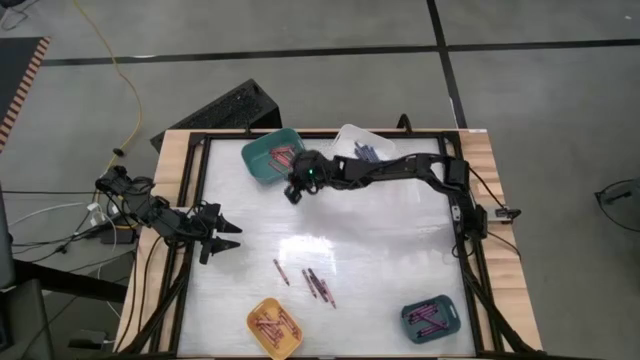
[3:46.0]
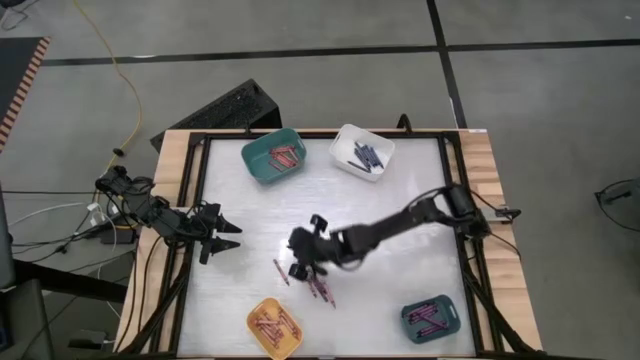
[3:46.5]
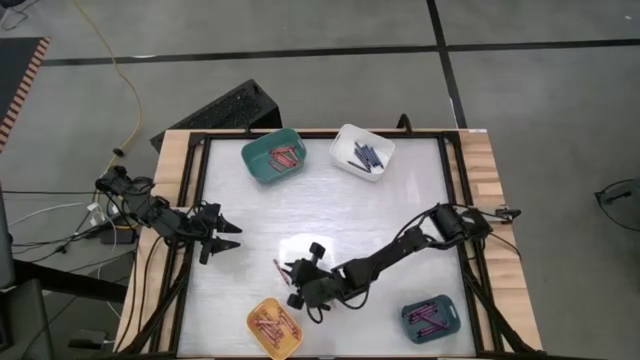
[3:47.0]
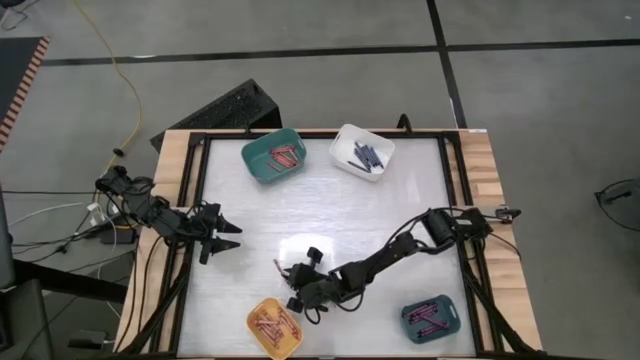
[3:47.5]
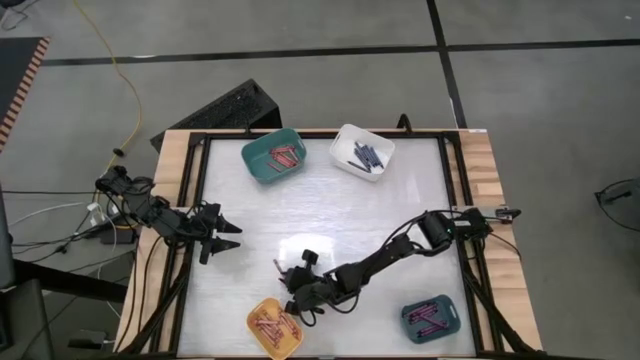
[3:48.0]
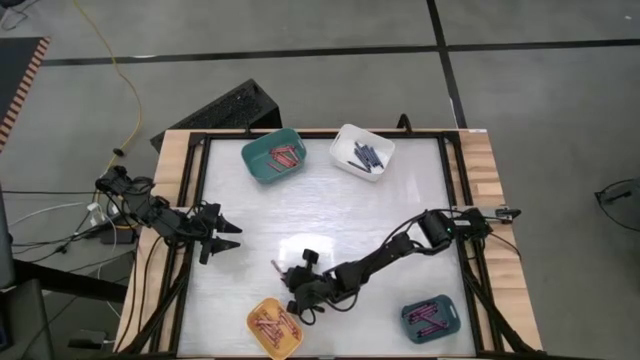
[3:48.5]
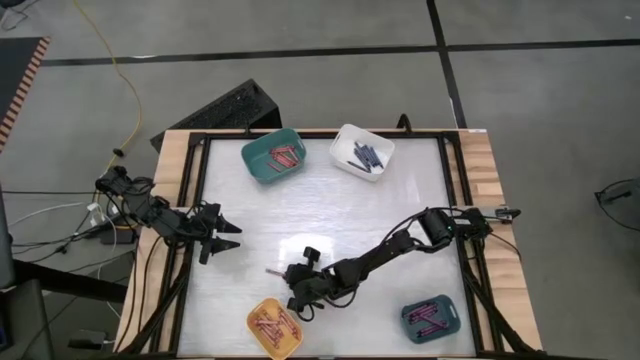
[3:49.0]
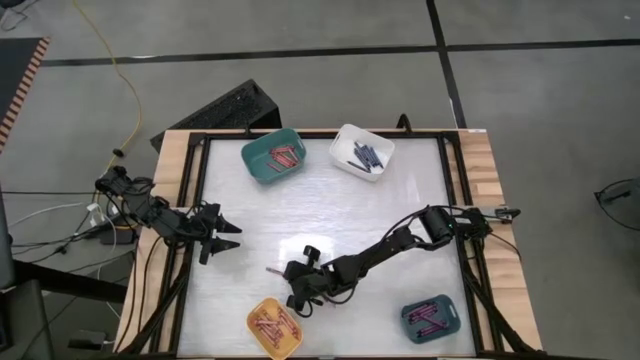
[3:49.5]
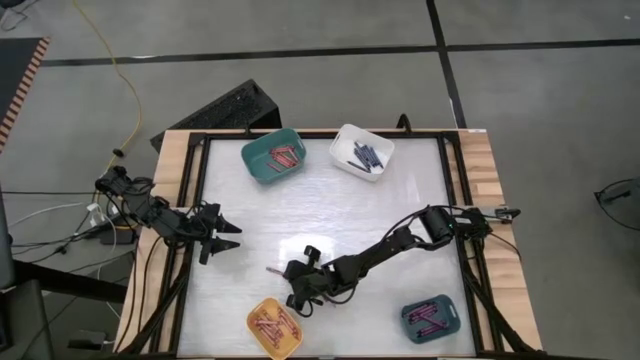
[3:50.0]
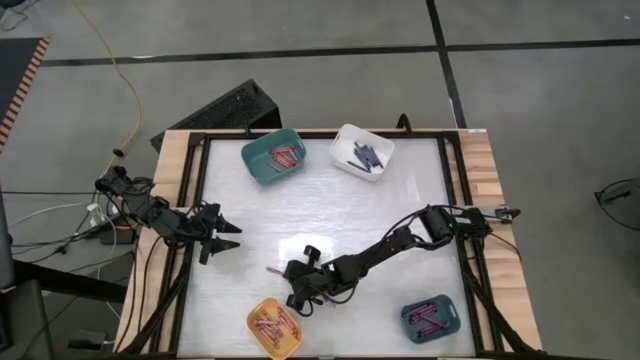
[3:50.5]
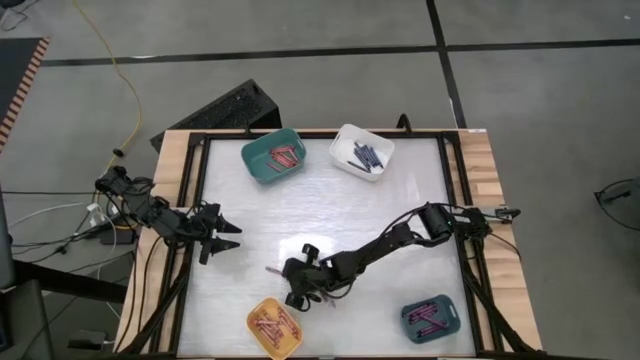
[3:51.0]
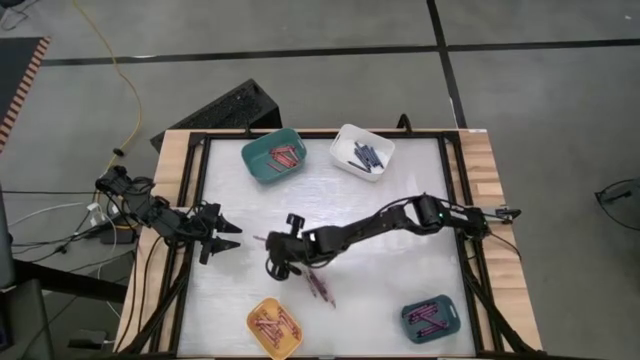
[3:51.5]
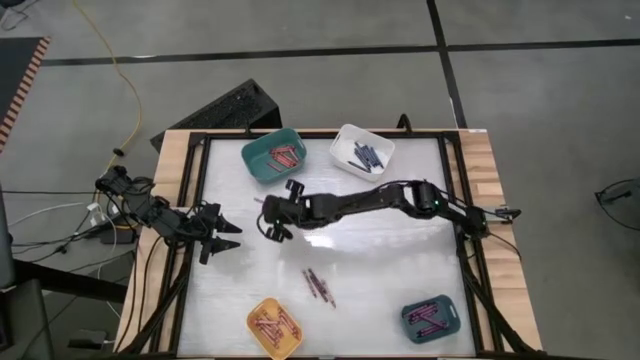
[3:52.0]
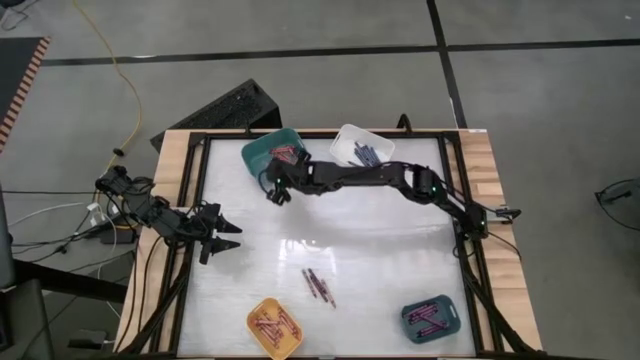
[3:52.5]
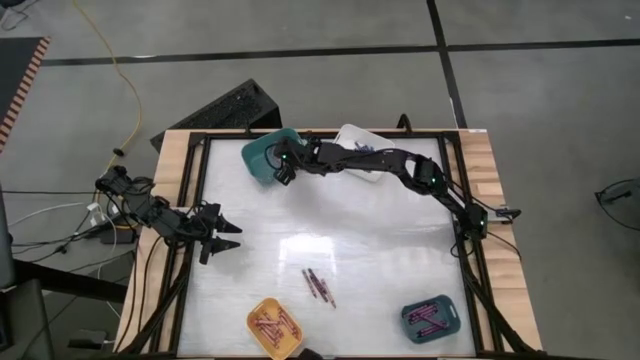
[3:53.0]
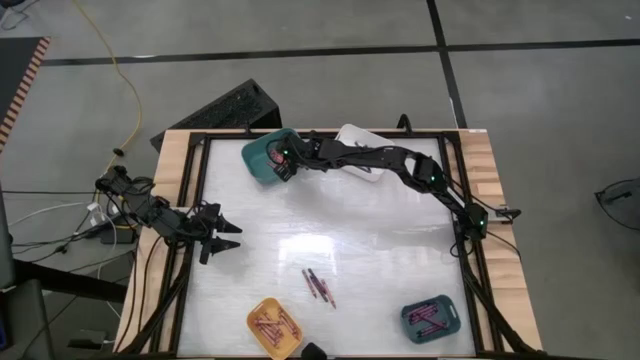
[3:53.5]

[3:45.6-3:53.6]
Task: Sort crayons
Put the red crayon into the top green bin

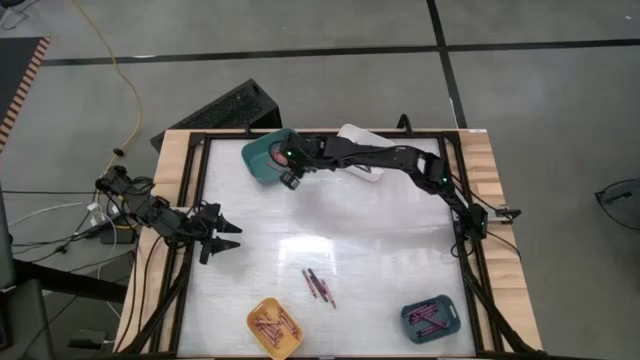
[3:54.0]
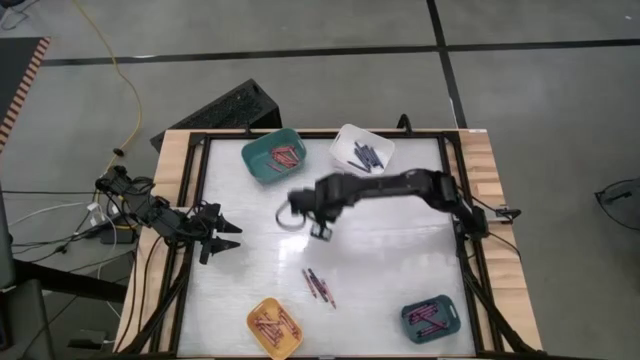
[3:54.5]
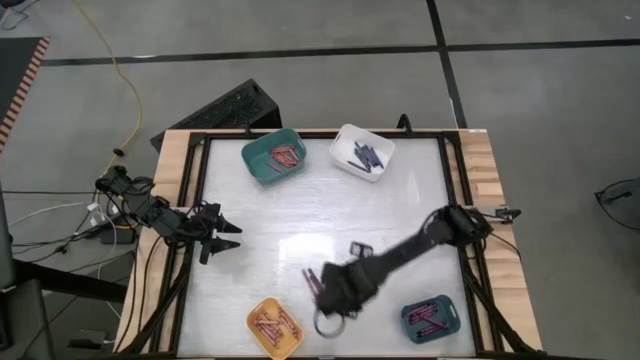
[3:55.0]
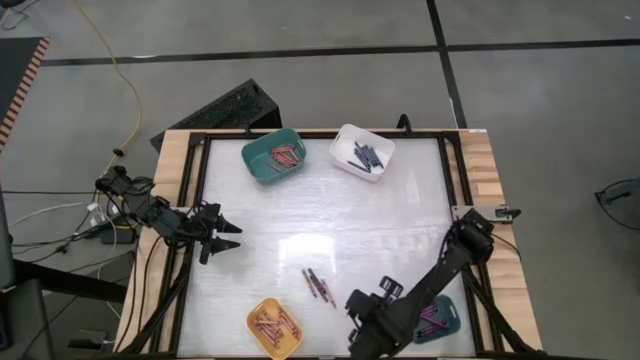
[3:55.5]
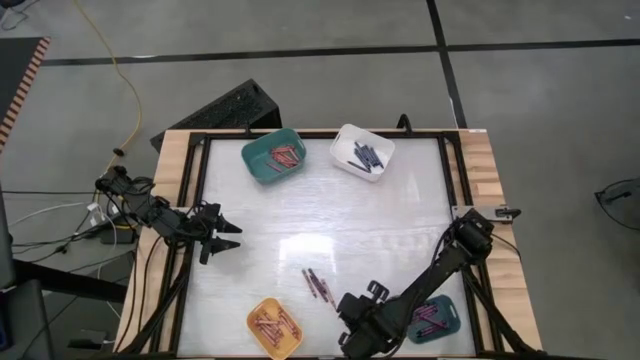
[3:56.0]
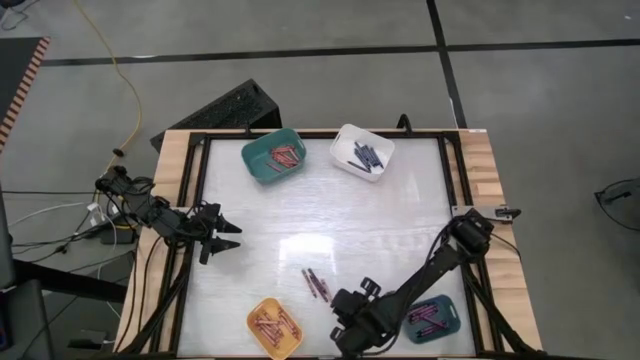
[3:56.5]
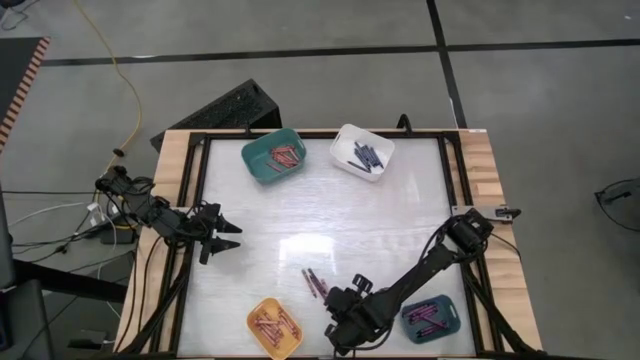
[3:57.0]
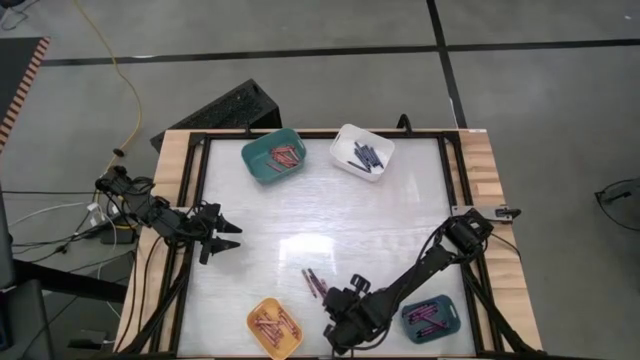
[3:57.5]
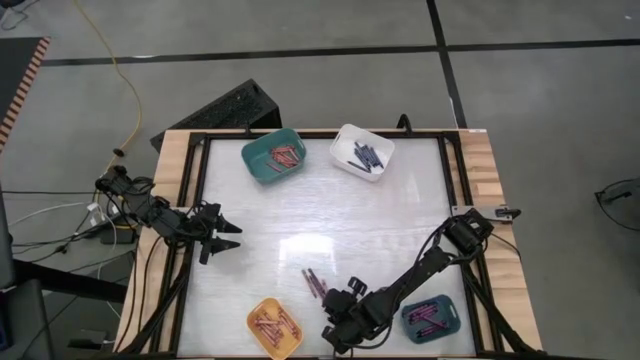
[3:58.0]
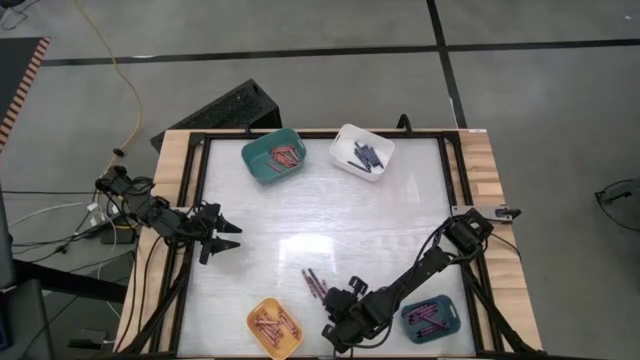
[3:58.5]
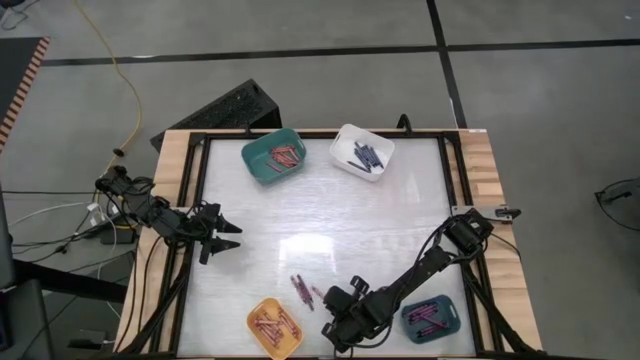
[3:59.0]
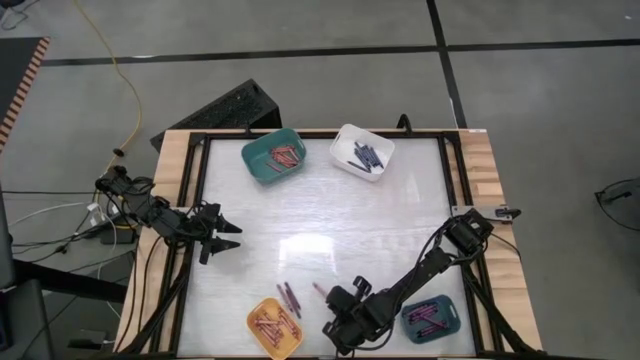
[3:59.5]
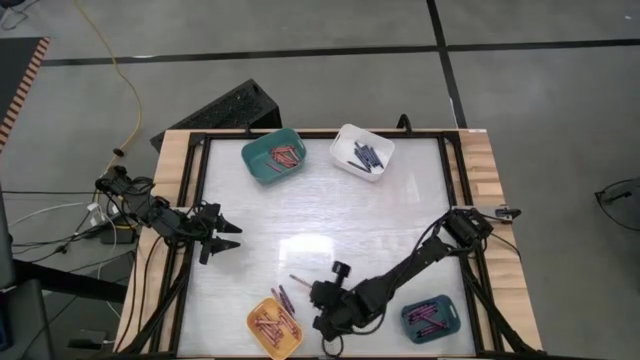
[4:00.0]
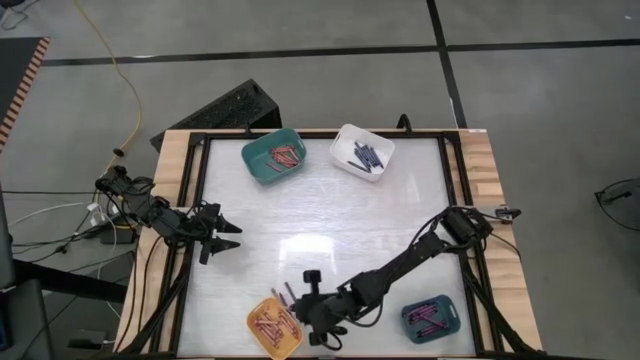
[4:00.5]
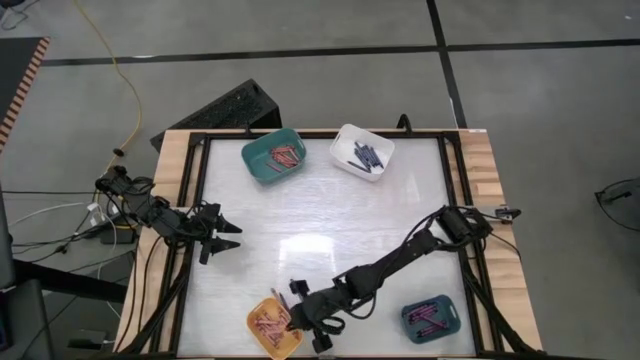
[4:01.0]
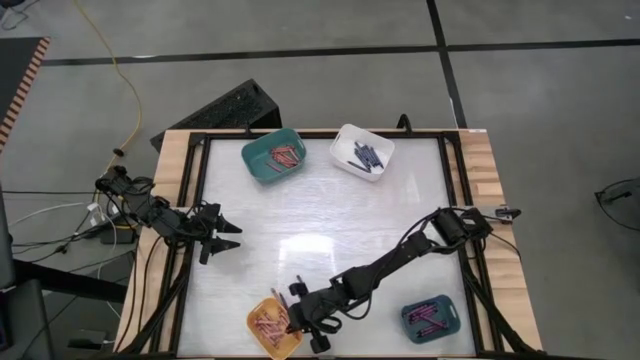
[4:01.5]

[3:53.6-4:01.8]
Put the pink crayon into the yellow bin

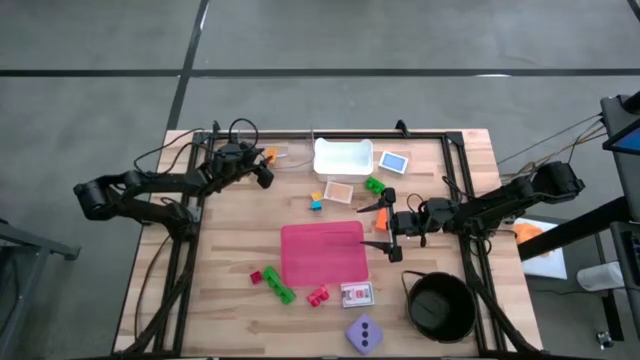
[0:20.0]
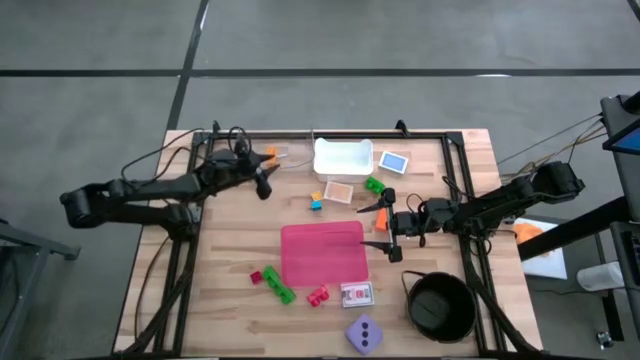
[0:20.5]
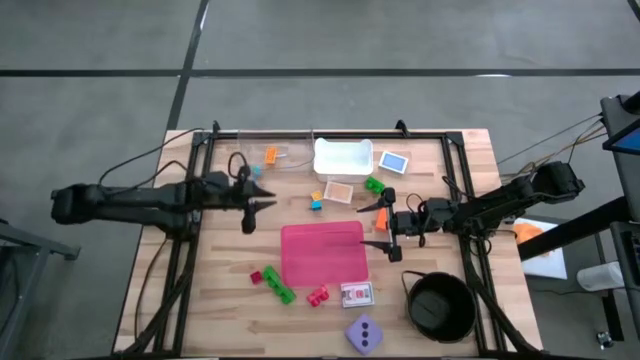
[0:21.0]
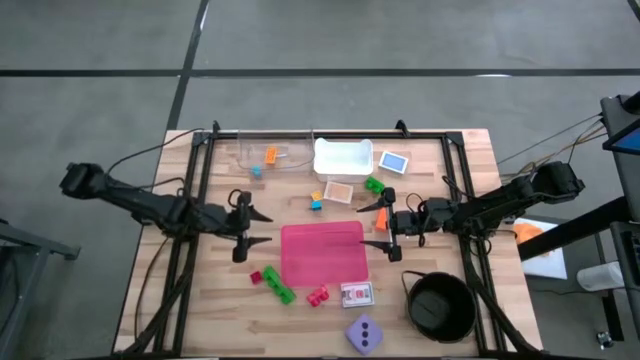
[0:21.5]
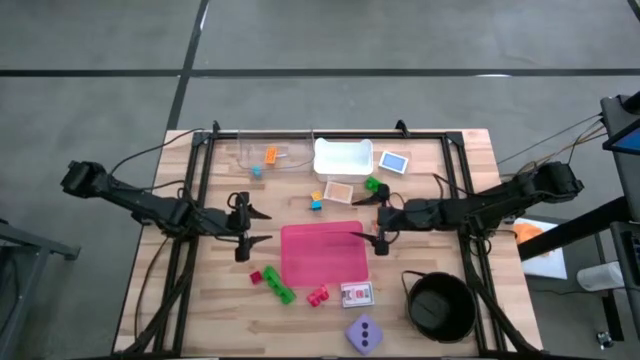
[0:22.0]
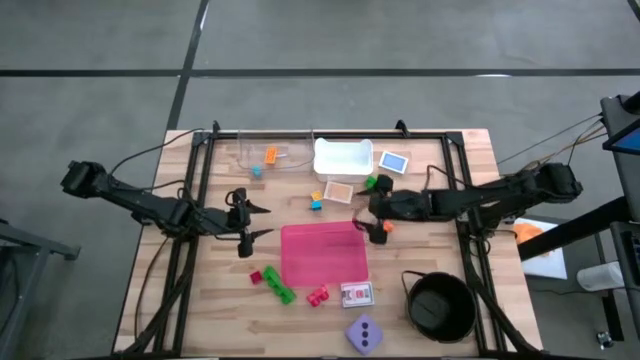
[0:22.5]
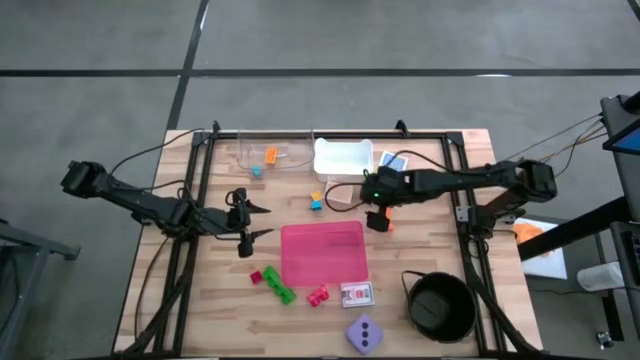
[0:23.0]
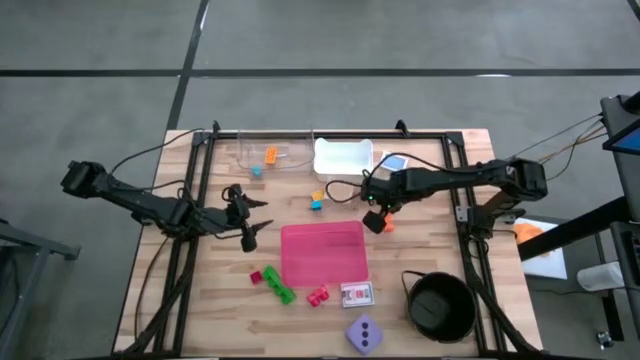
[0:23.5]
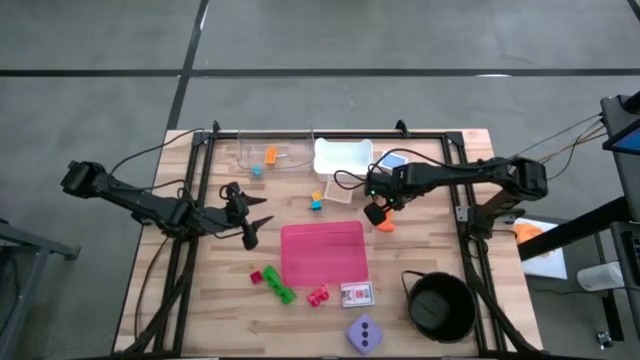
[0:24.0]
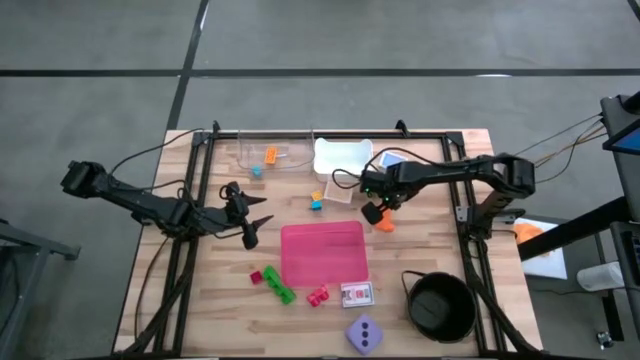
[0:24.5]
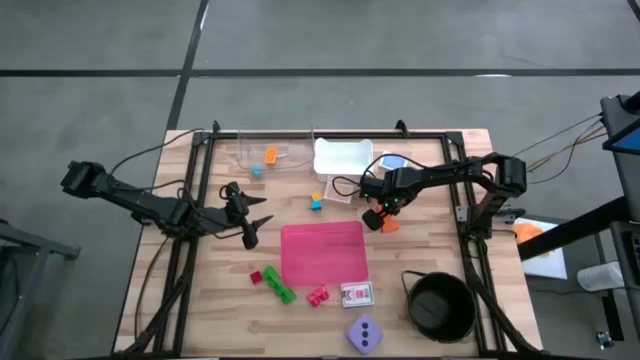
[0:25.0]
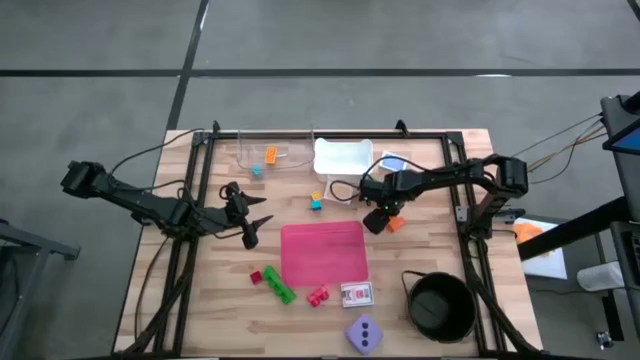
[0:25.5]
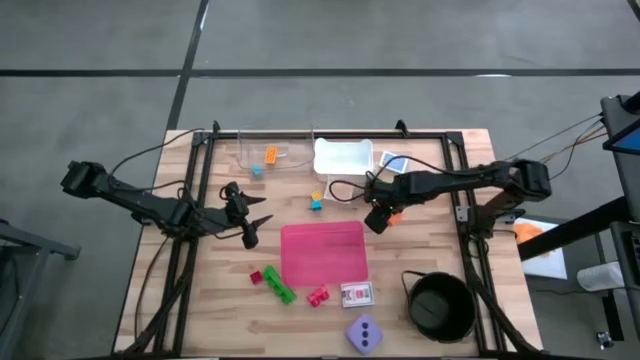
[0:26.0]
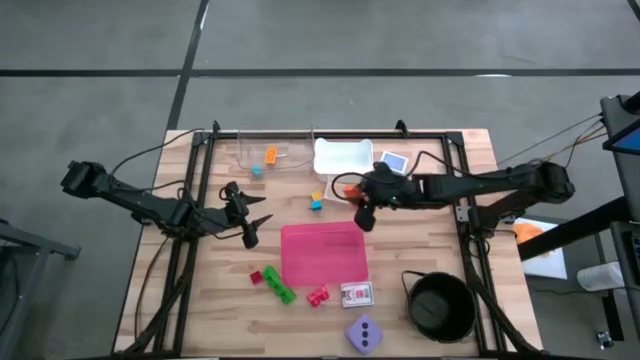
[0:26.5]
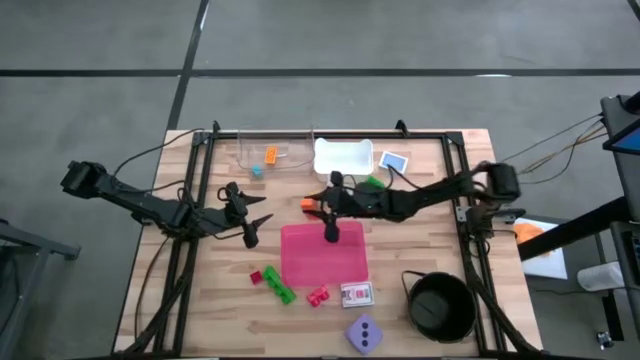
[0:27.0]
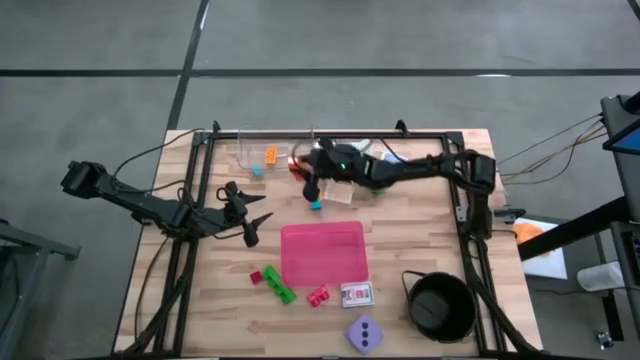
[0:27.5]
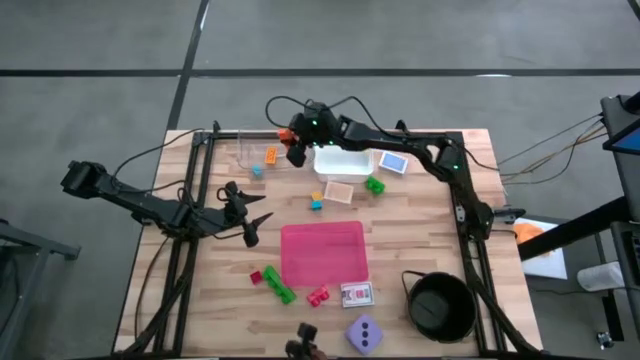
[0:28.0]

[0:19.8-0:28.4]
Task: Pick & Place Toys
Put the orange game piece into the transparent bin
